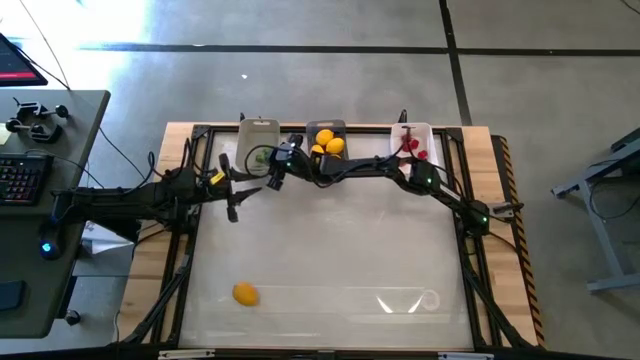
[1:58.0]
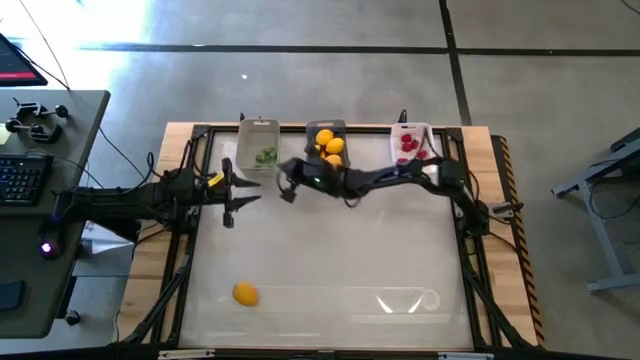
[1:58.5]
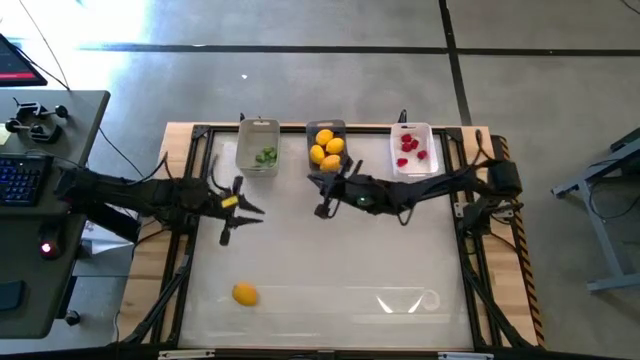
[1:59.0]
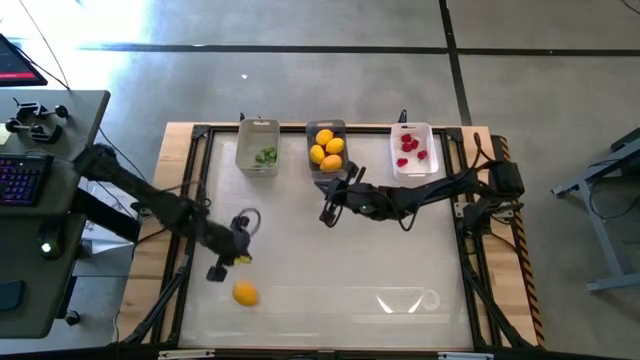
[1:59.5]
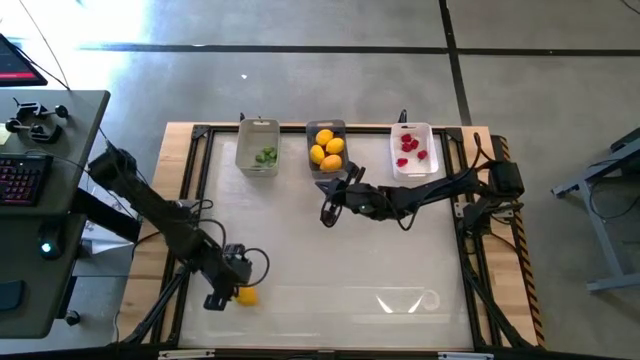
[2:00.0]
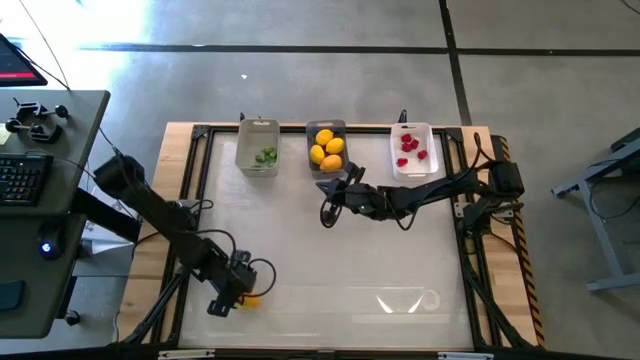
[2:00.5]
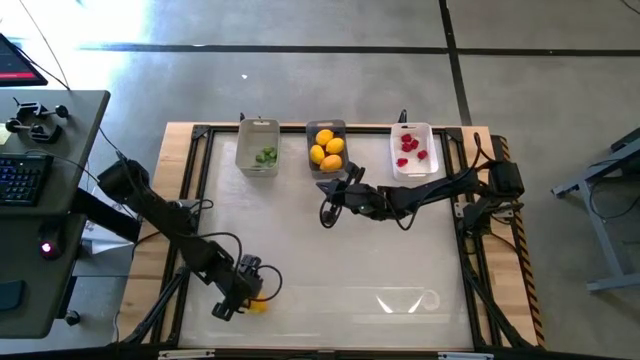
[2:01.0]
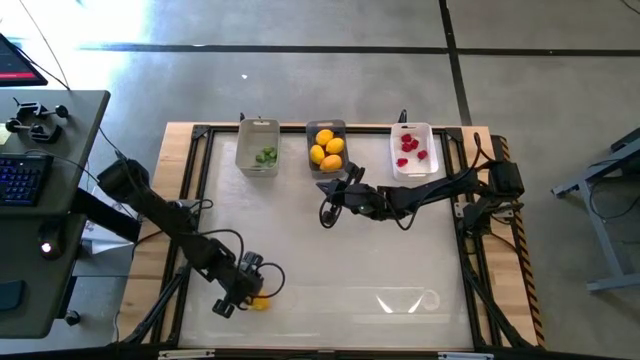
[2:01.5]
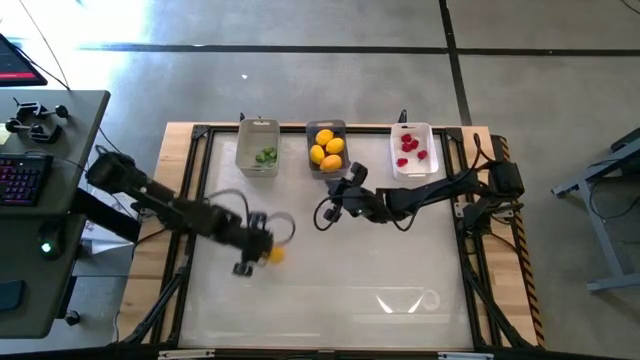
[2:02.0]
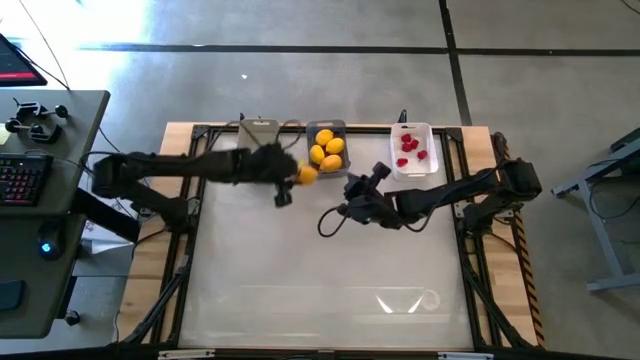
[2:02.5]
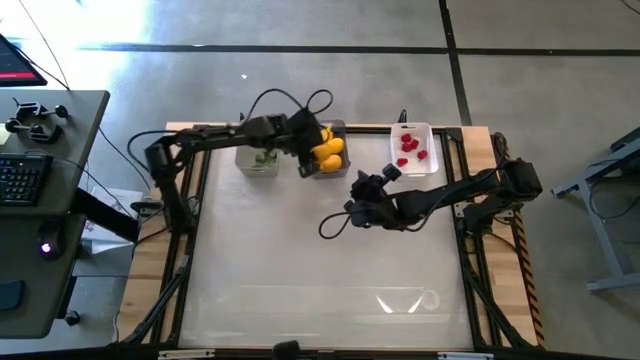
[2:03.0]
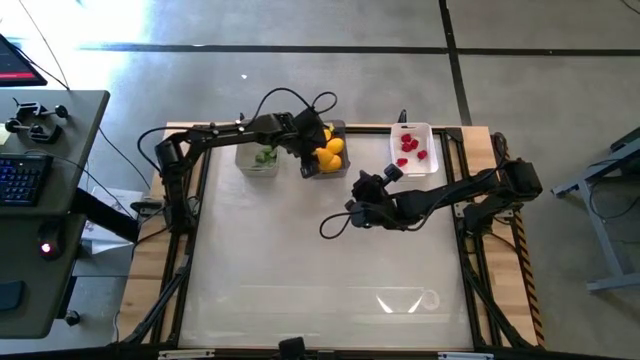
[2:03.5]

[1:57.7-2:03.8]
Task: Sort produce into baskets
Put the lemon into the black bin

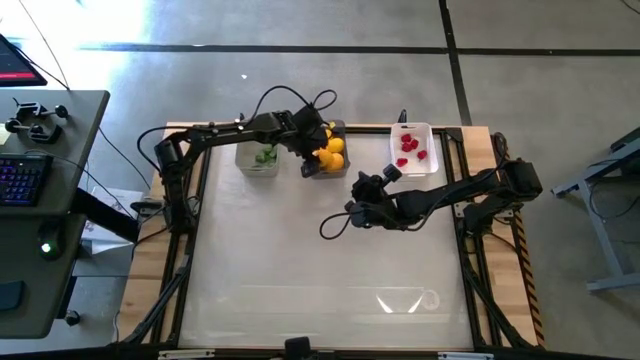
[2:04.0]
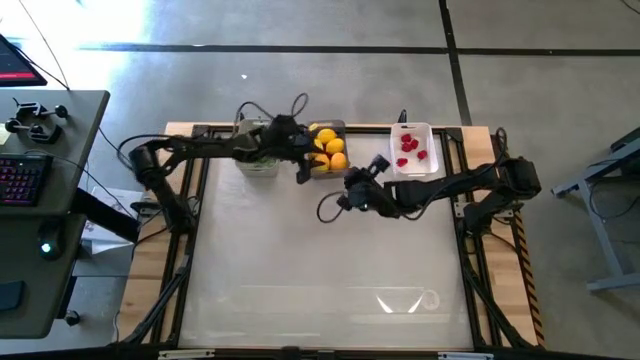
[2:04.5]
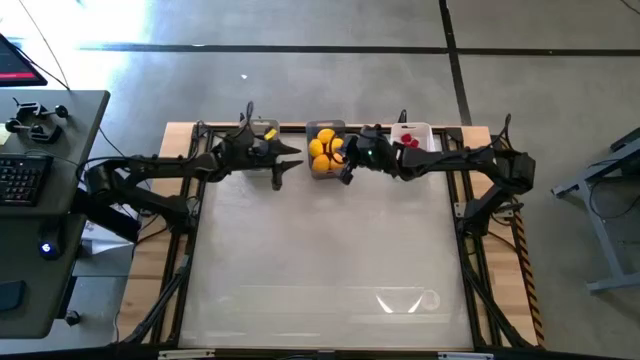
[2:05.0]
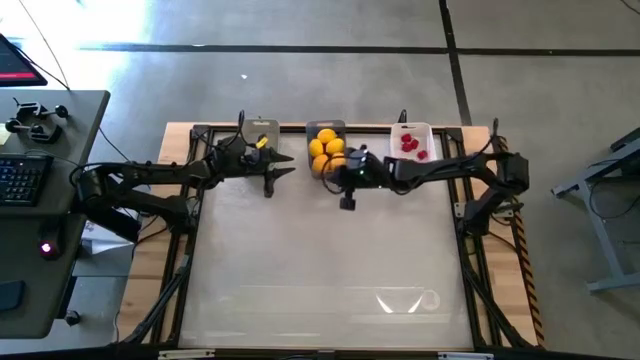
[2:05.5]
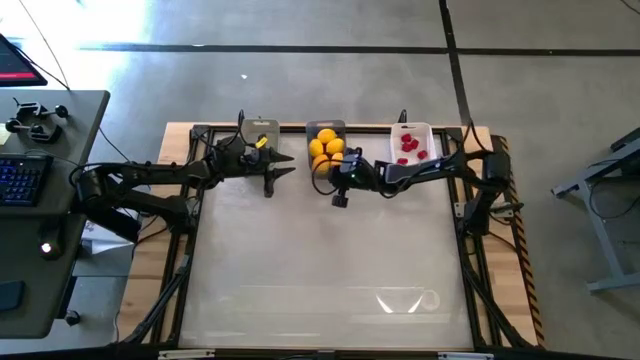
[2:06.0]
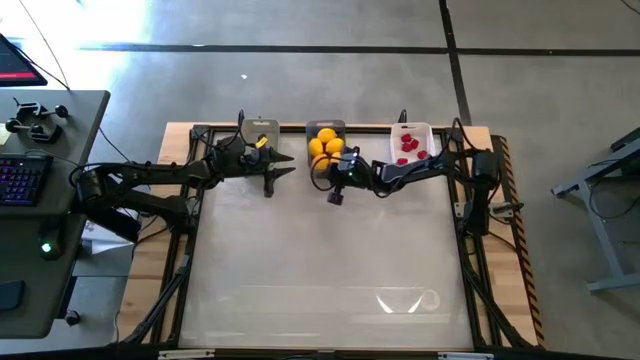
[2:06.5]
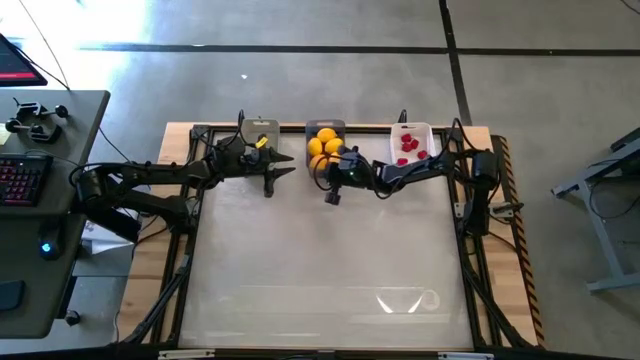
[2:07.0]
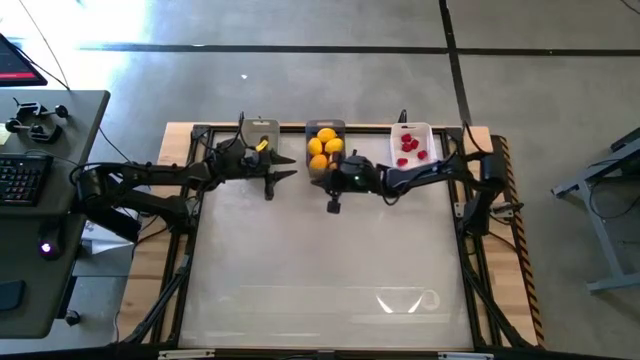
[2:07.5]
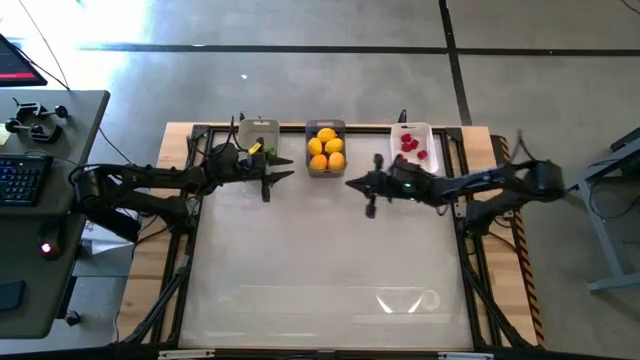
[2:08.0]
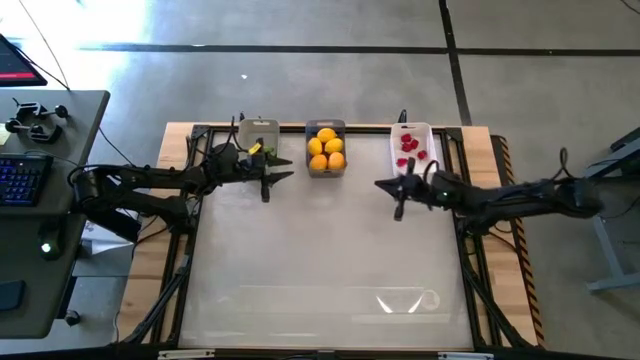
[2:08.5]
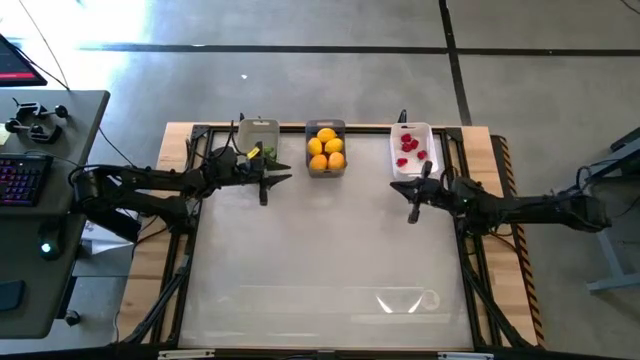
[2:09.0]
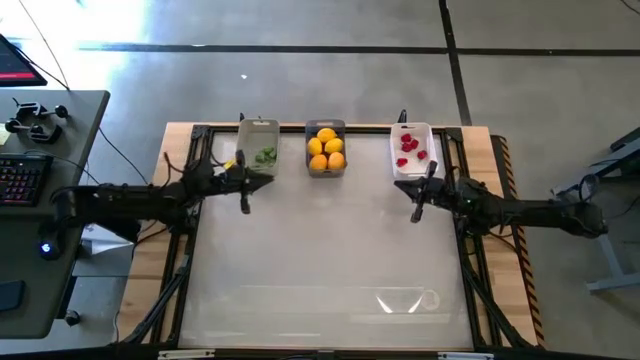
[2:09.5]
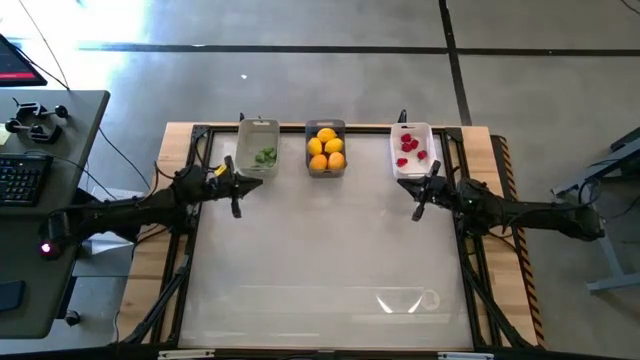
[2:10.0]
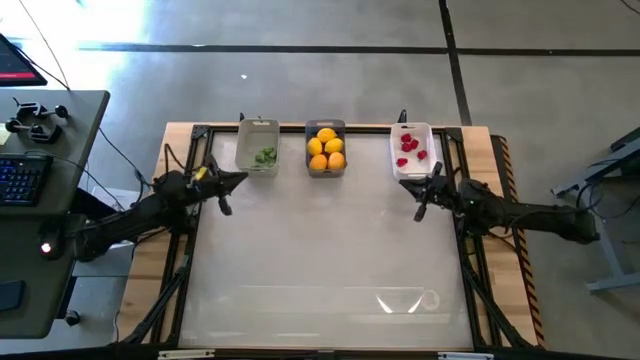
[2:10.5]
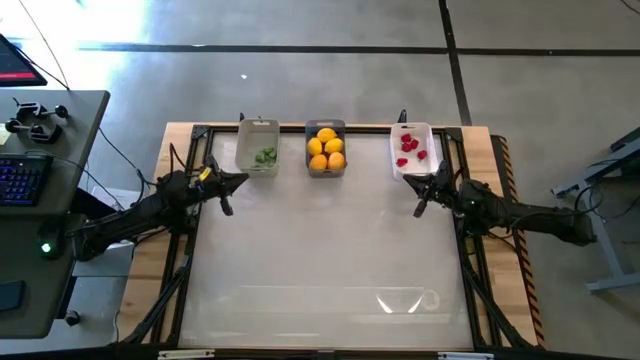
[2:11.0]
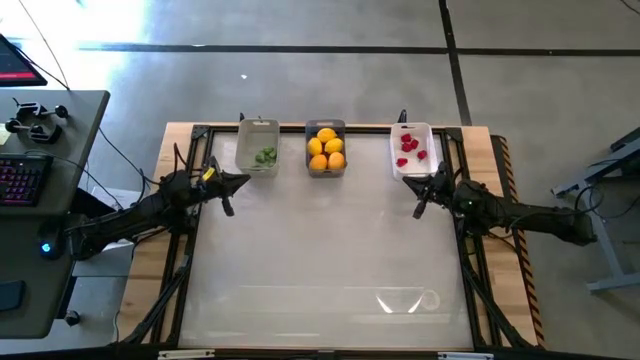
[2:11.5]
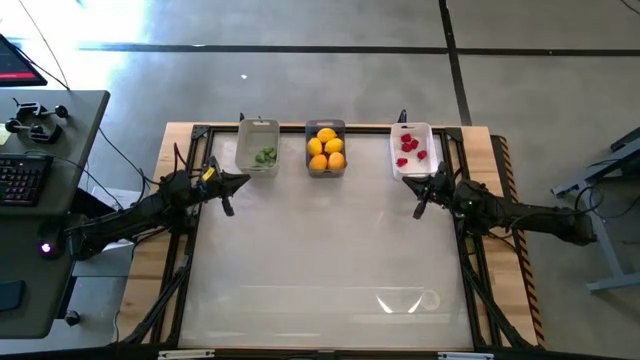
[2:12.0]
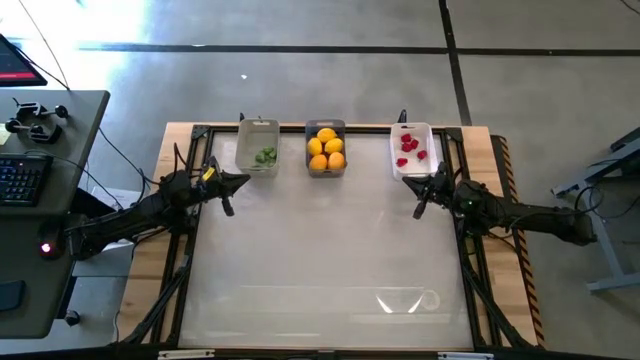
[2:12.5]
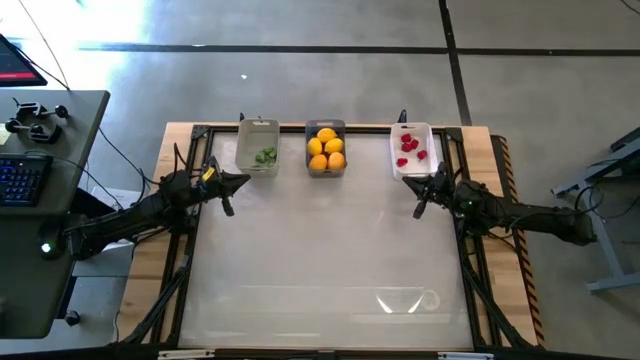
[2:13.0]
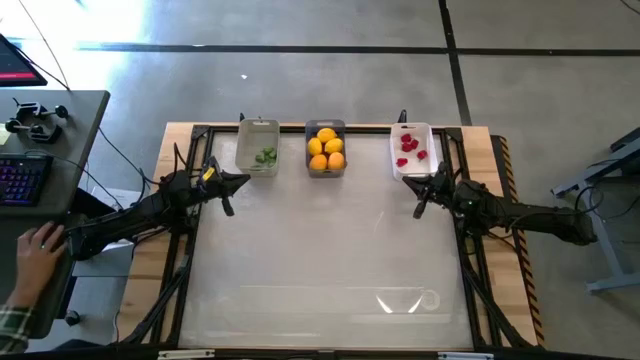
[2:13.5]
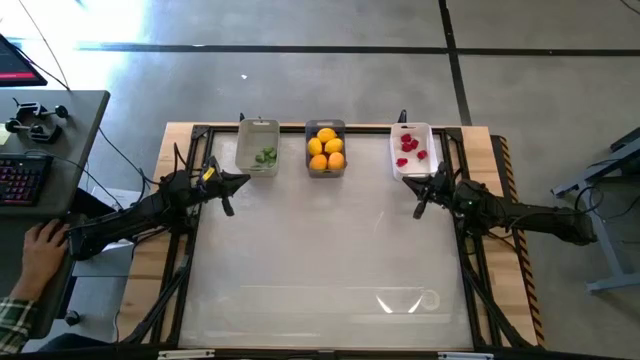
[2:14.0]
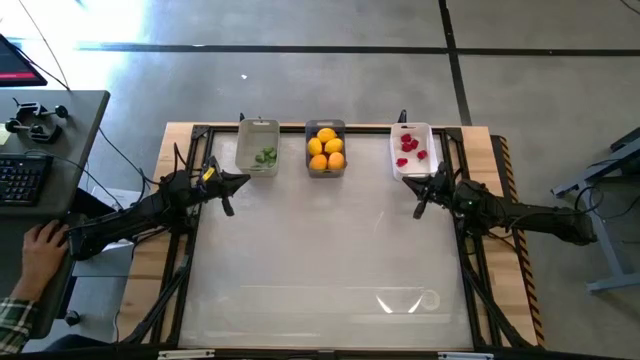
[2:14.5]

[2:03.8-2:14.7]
Return to Home Position

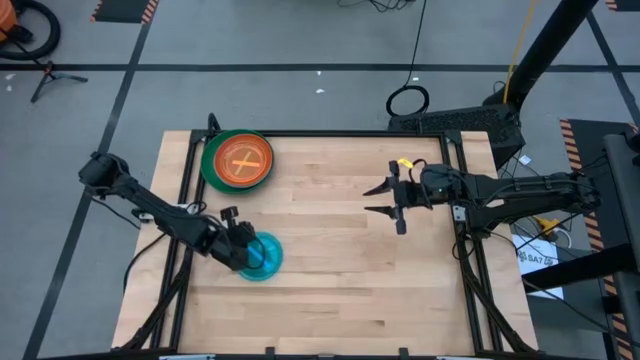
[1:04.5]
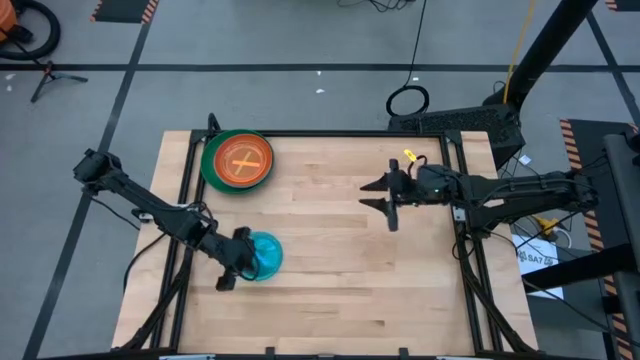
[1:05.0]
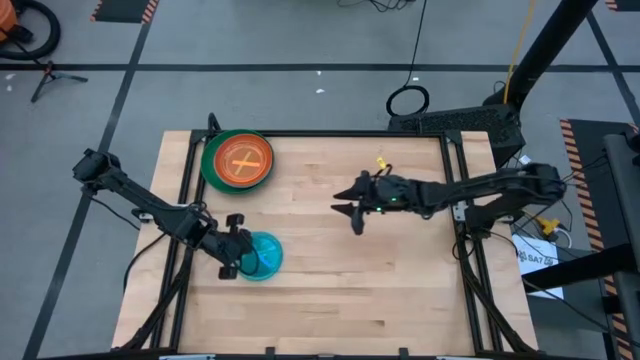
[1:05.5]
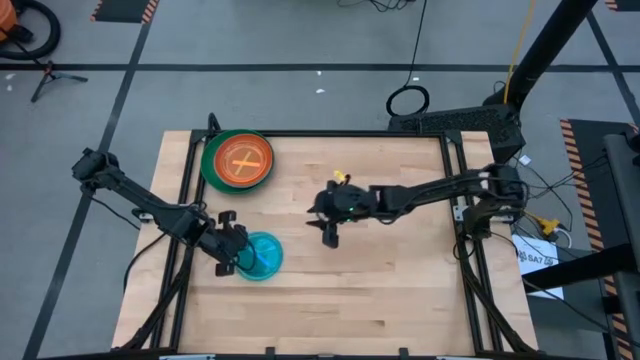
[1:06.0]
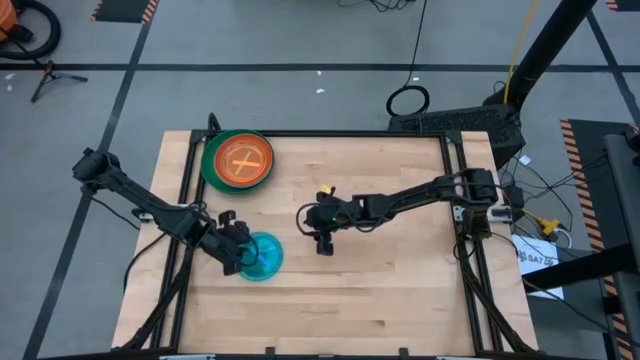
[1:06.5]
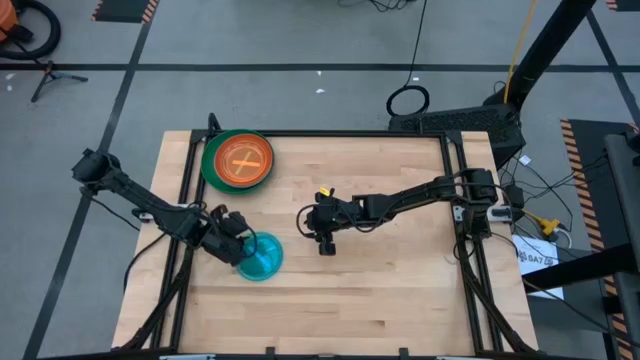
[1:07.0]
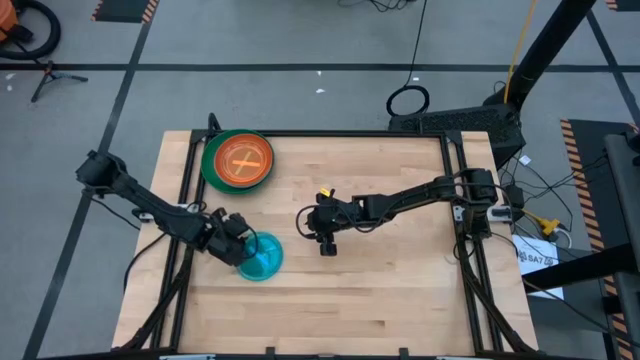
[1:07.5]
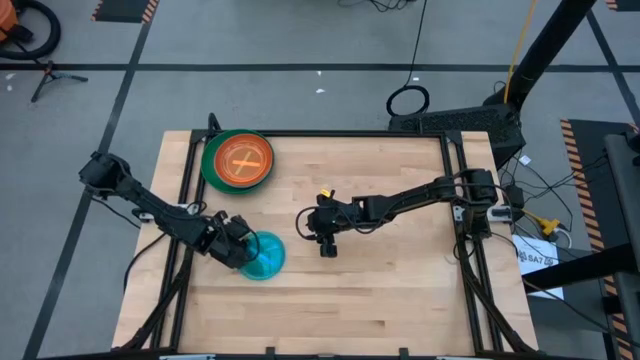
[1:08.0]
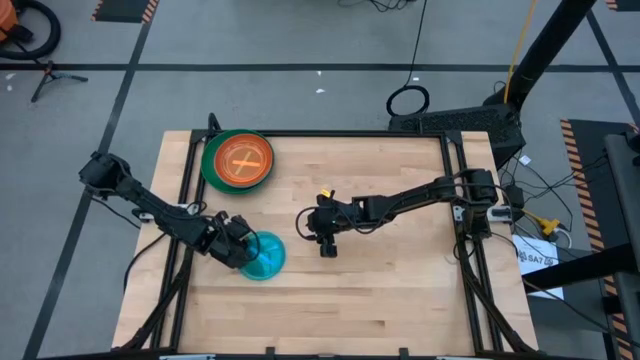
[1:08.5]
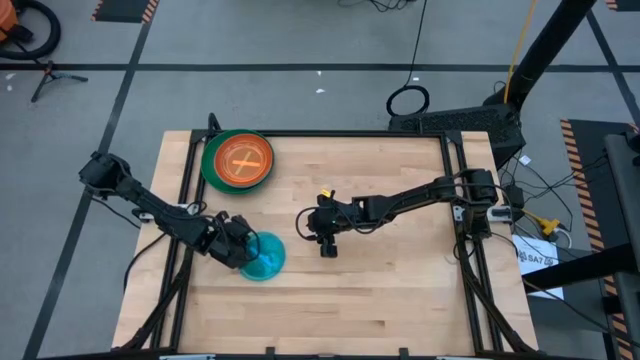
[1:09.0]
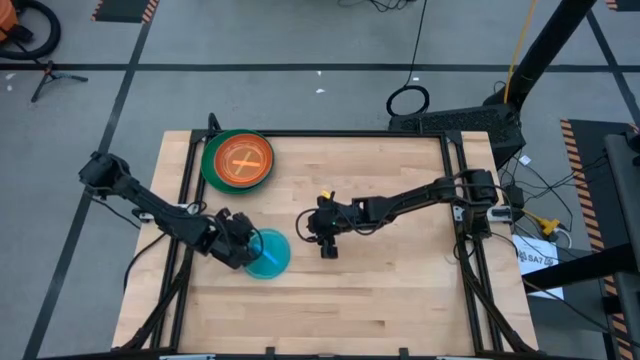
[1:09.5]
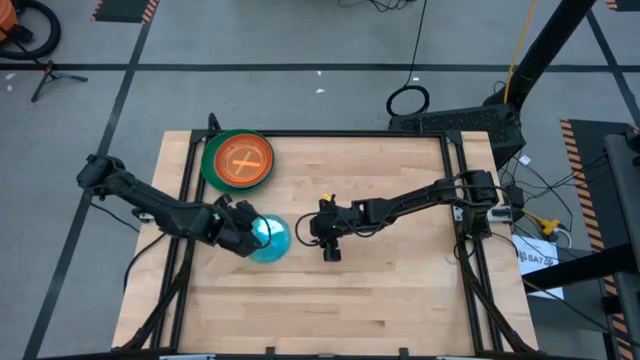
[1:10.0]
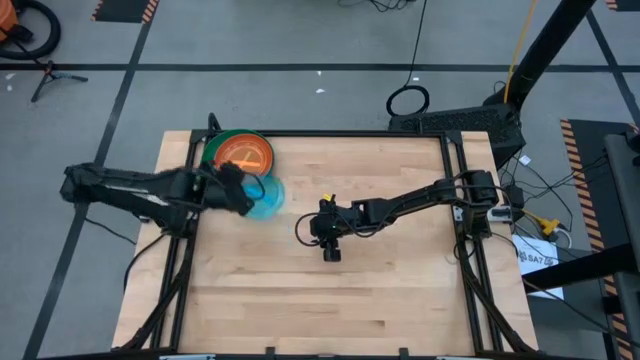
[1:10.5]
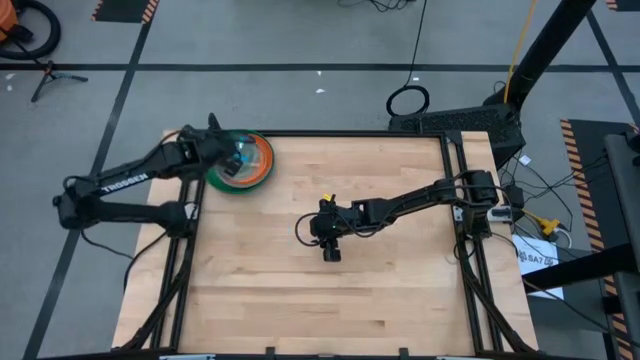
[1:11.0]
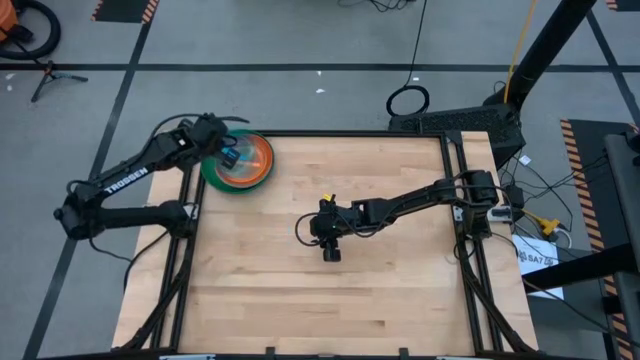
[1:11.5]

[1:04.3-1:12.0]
Task: Stack plastic plates
Stack the blue plate on top of the orange plate
